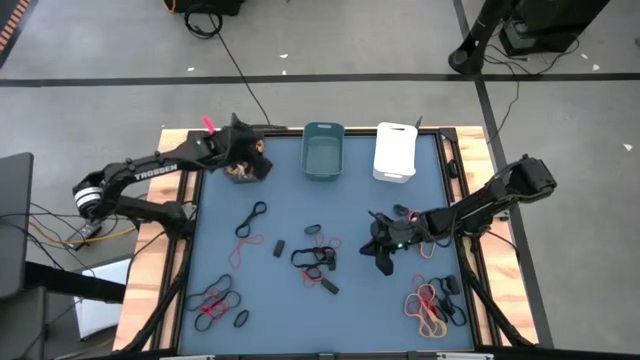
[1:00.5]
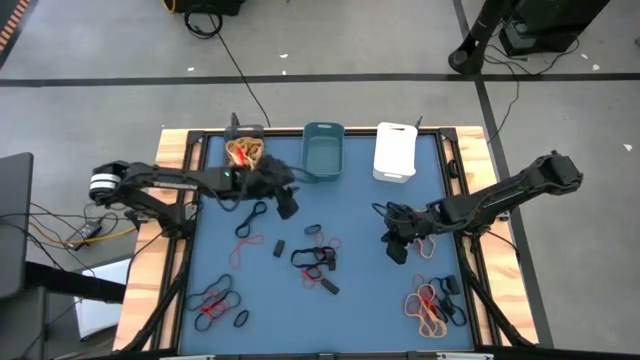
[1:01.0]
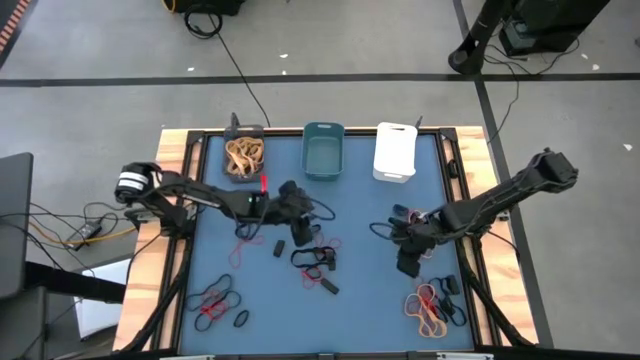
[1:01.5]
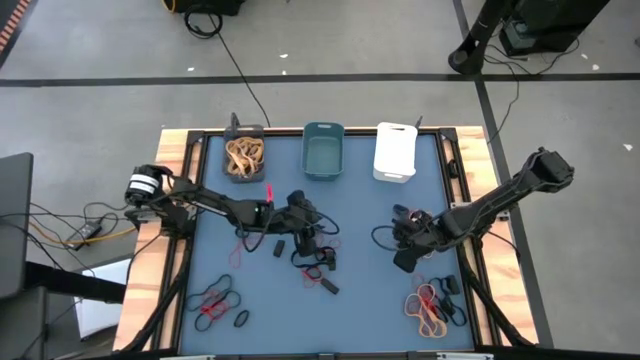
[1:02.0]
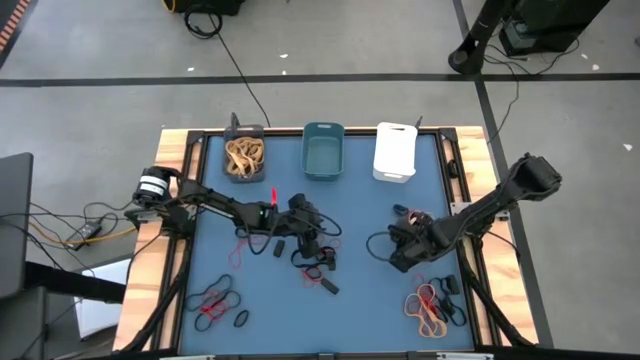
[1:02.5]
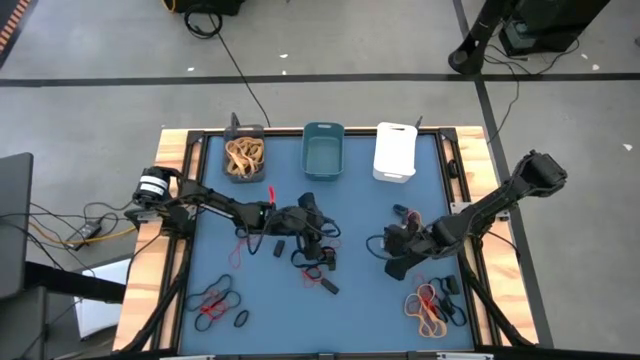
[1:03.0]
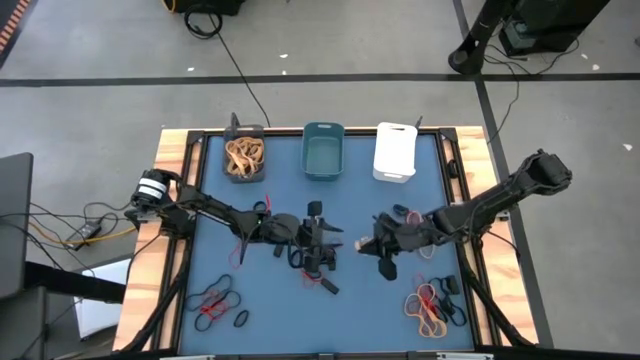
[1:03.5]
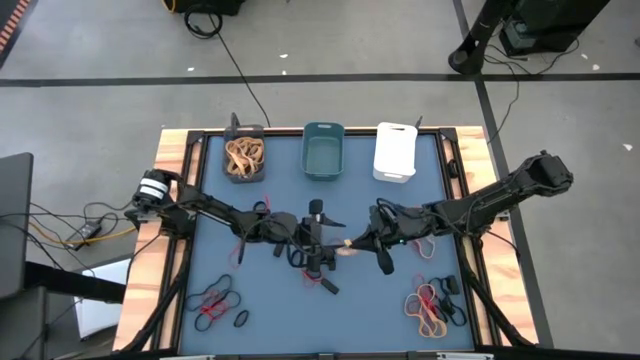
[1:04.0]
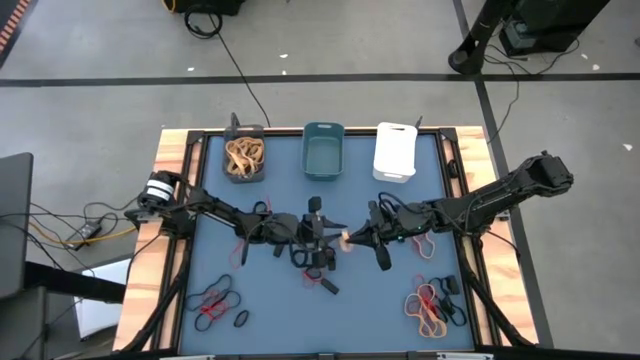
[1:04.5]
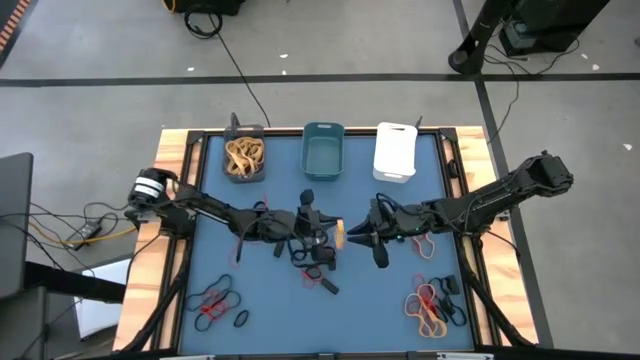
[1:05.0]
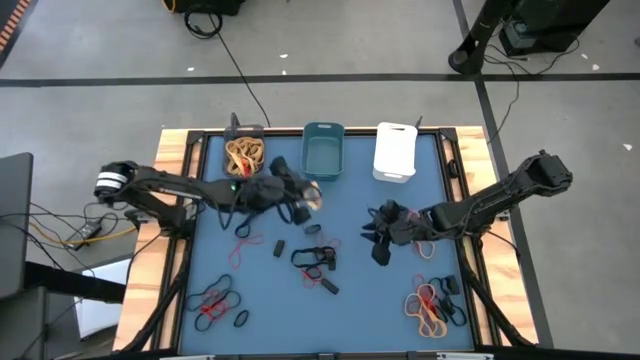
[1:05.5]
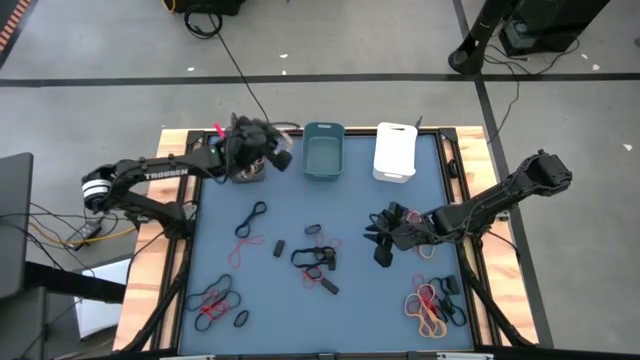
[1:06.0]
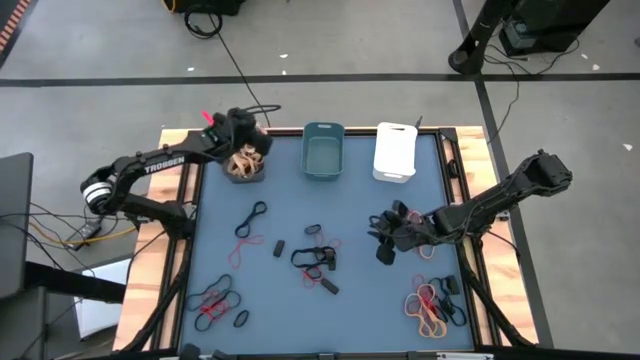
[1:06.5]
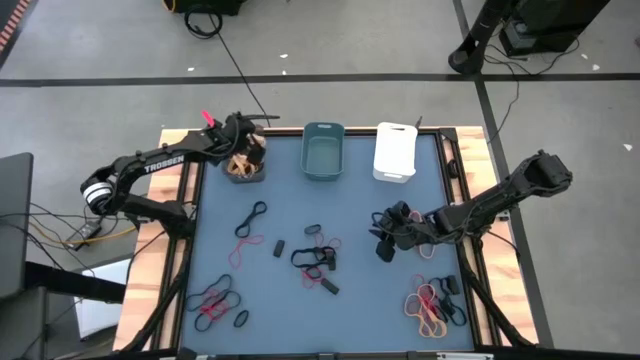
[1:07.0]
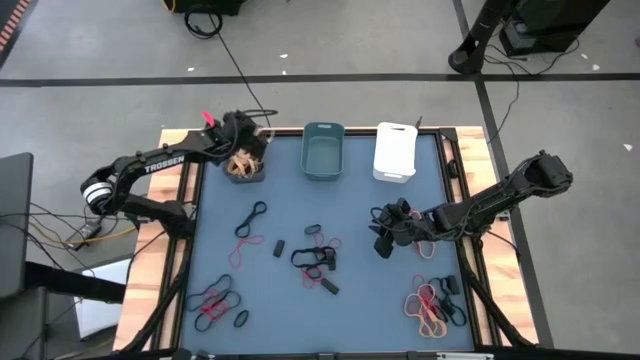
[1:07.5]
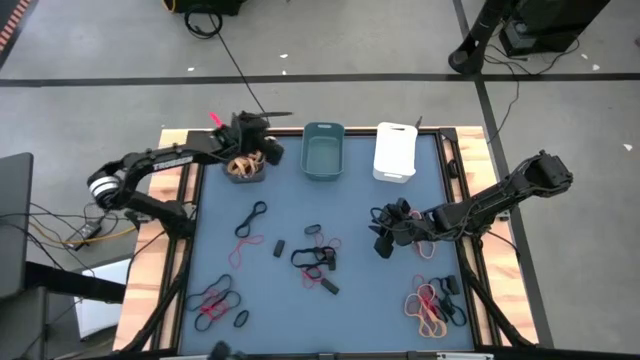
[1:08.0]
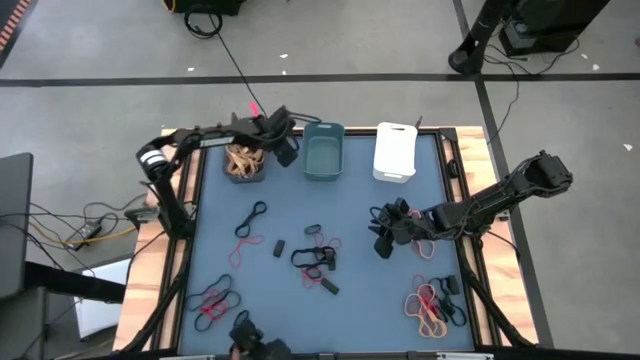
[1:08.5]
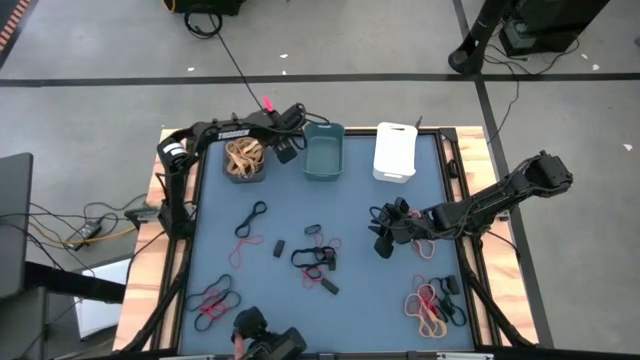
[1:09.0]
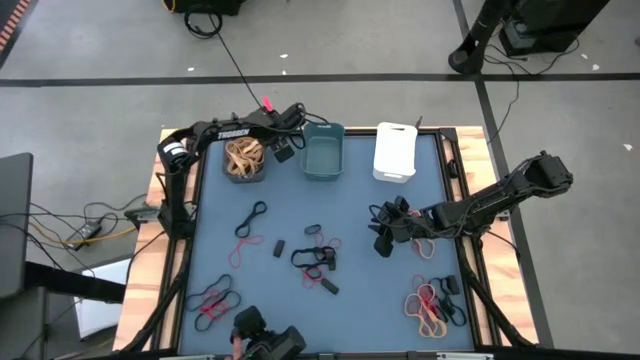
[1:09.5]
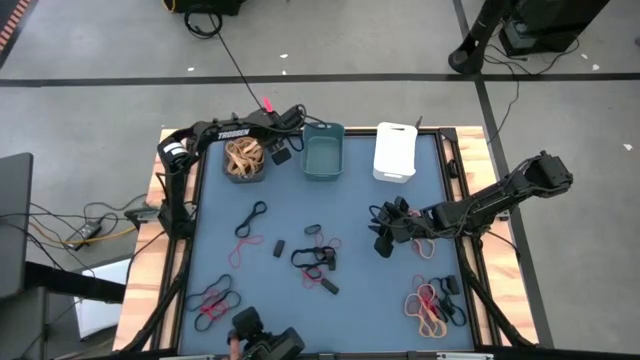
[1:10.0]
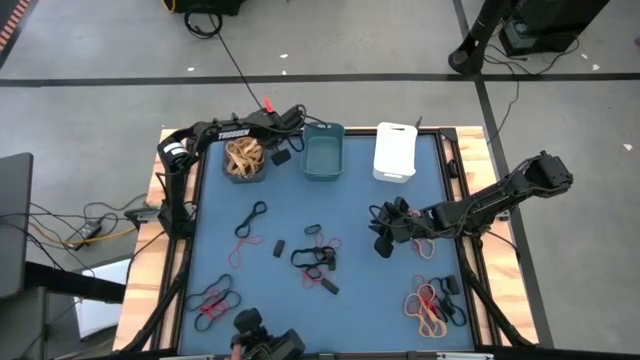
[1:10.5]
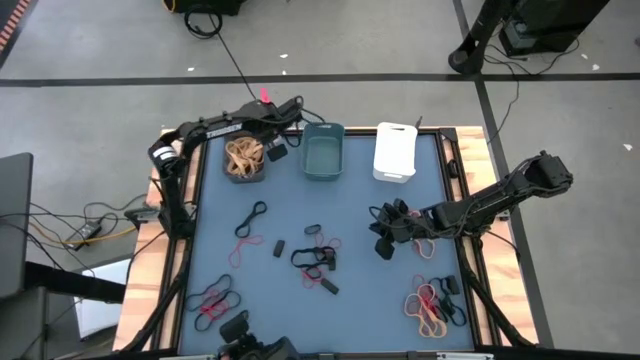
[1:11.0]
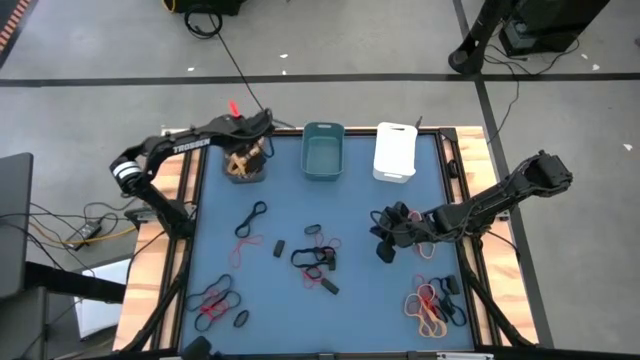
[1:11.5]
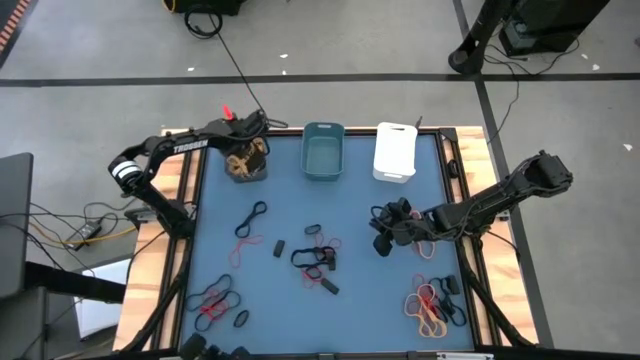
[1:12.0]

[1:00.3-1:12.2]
Task: Sort rubber bands into baskets
Put the yellow rubber band into the black bin

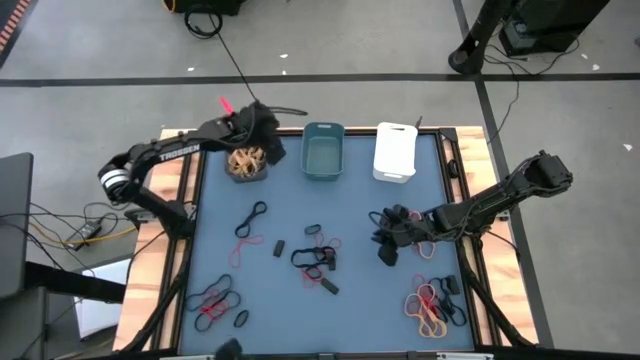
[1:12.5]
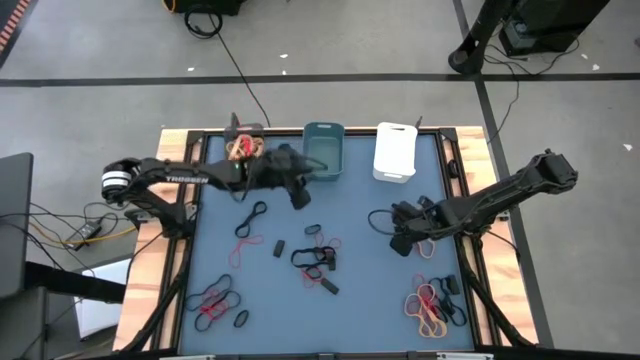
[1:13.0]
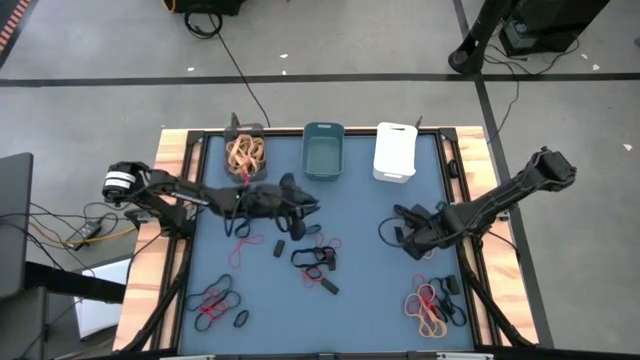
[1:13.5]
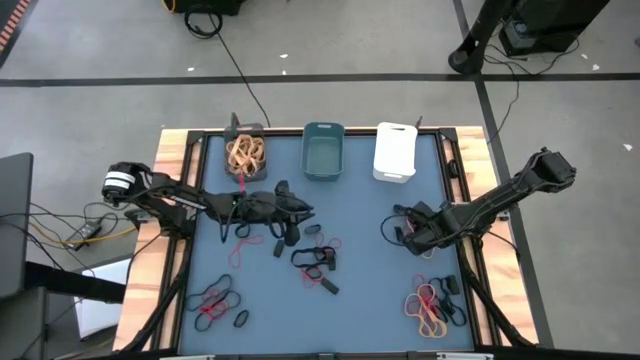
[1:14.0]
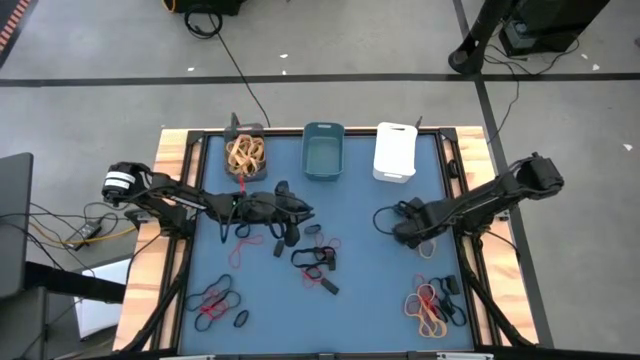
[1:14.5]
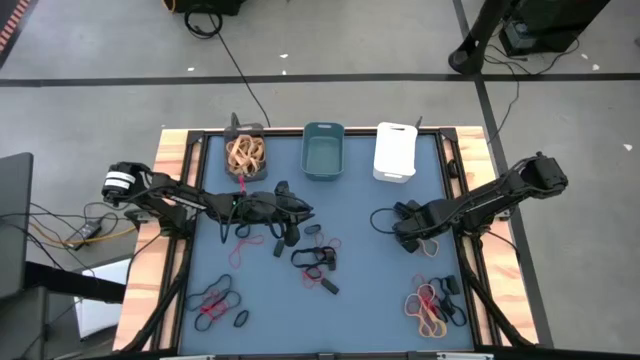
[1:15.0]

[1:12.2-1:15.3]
Put the yellow rubber band into the black bin

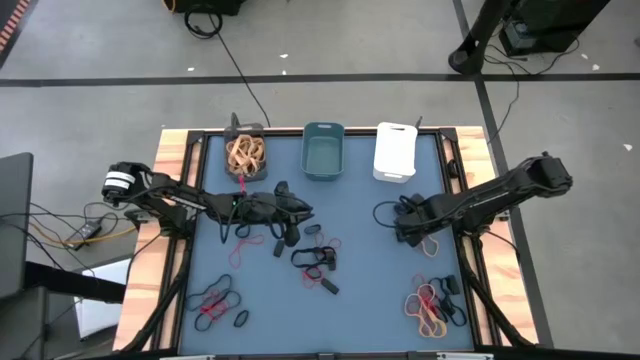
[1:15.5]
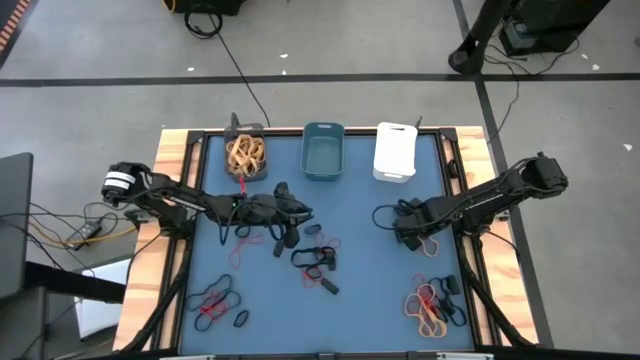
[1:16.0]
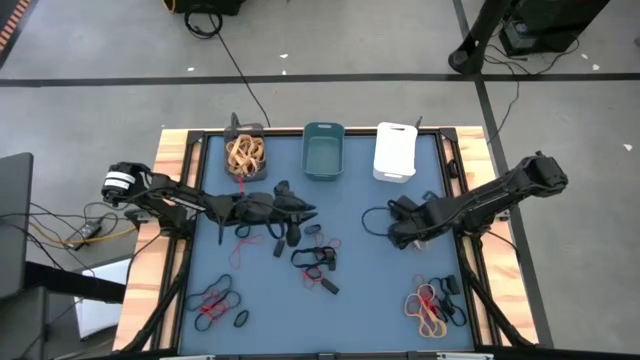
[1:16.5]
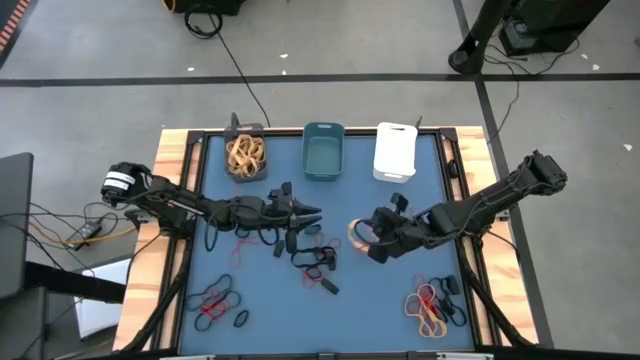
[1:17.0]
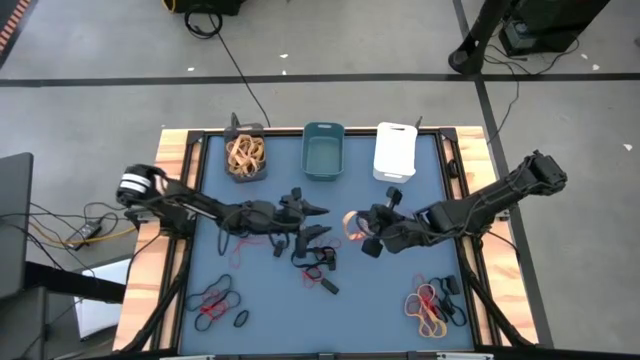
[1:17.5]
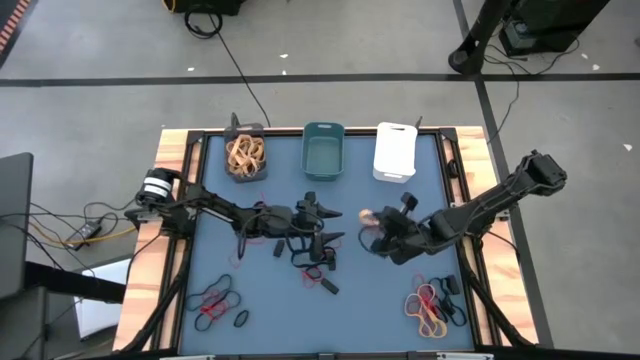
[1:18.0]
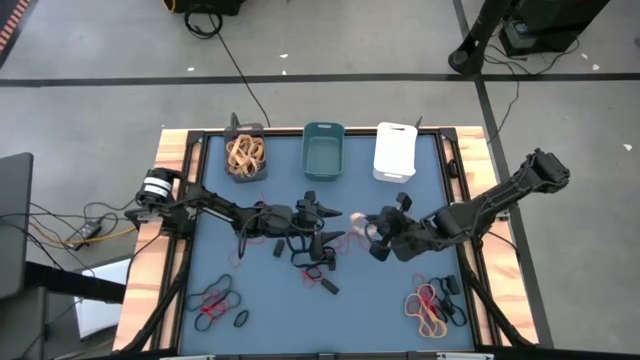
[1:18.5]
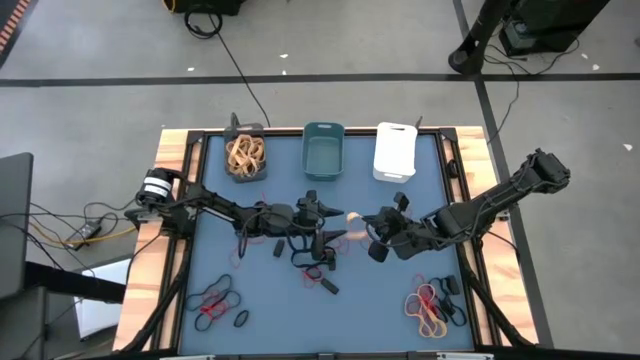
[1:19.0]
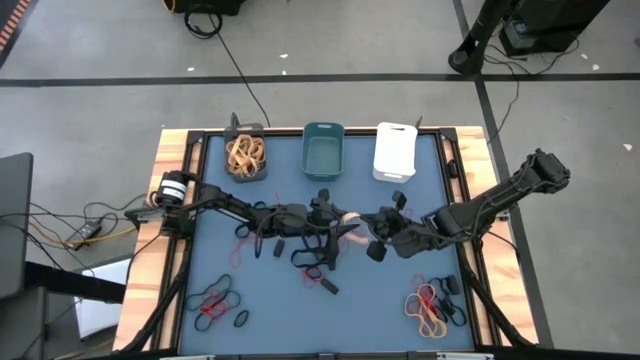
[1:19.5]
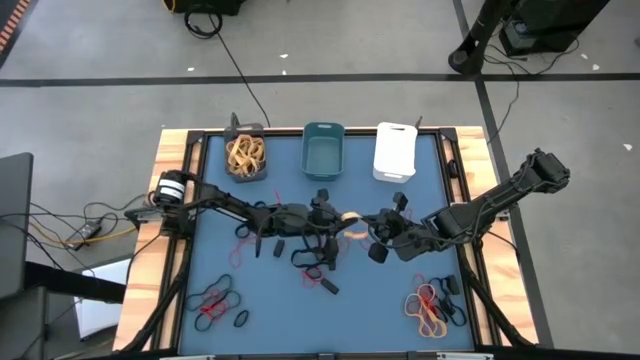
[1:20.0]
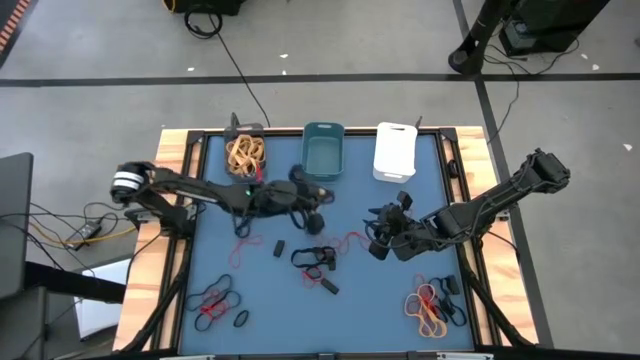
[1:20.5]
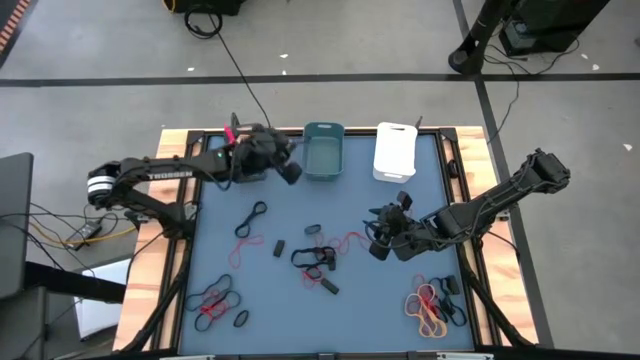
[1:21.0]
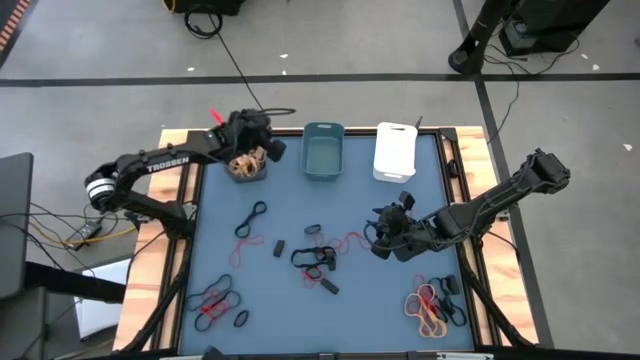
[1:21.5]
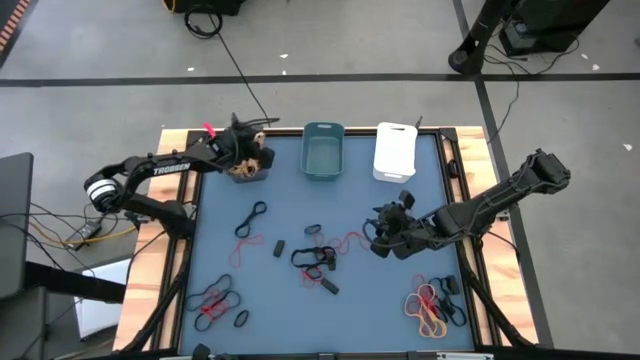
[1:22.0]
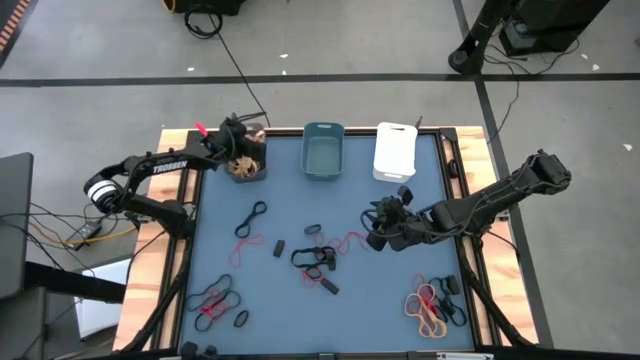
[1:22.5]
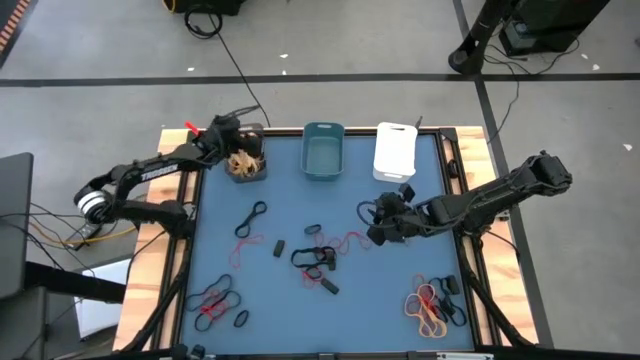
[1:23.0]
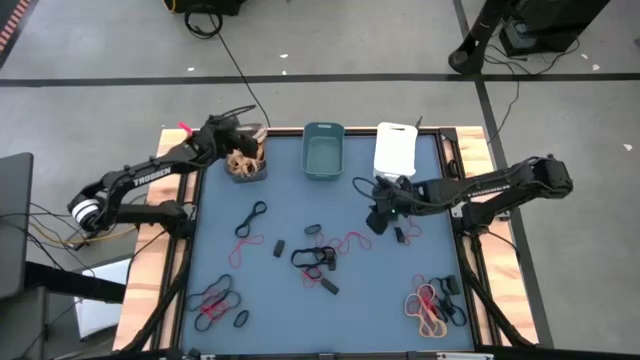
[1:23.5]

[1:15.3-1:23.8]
Put the yellow rubber band into the black bin
